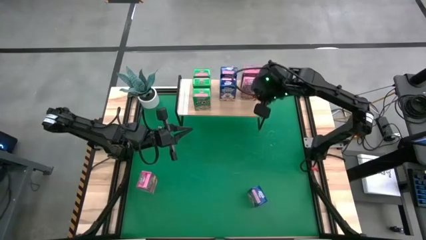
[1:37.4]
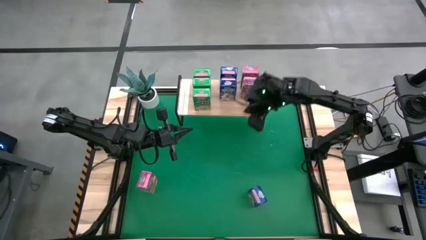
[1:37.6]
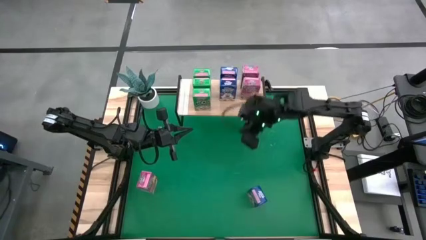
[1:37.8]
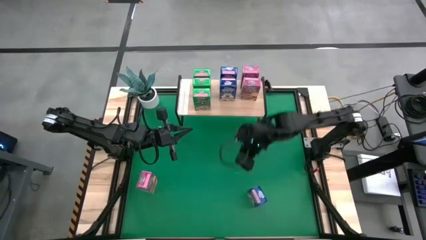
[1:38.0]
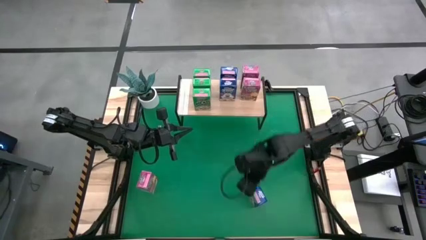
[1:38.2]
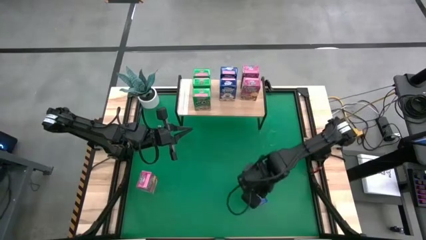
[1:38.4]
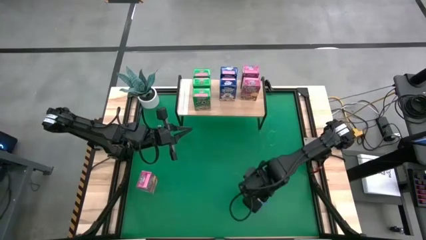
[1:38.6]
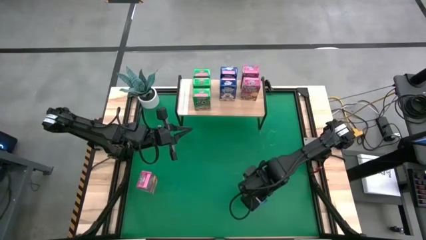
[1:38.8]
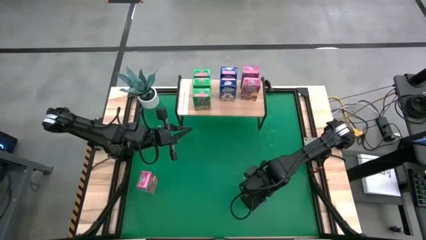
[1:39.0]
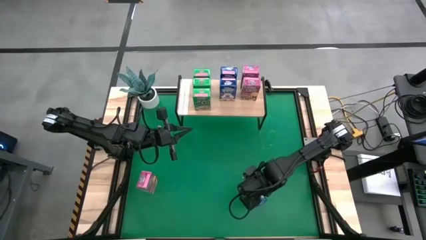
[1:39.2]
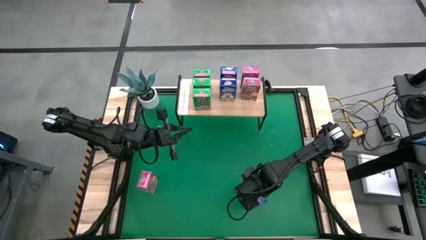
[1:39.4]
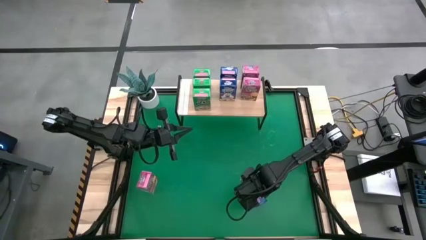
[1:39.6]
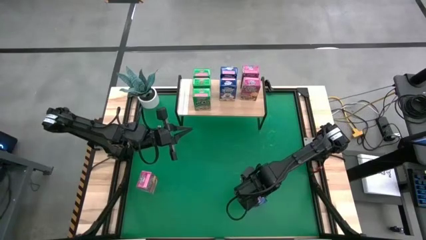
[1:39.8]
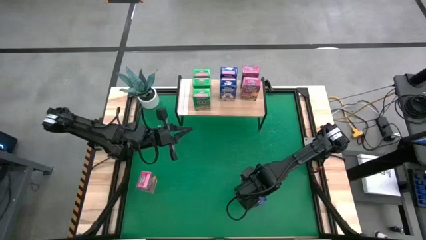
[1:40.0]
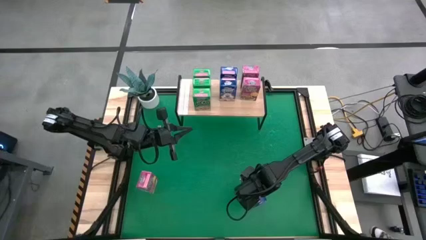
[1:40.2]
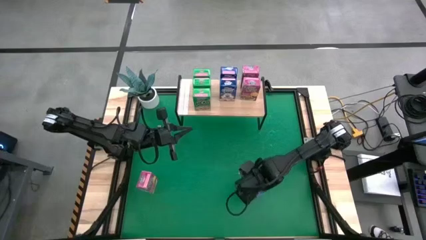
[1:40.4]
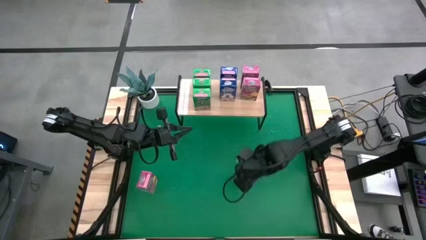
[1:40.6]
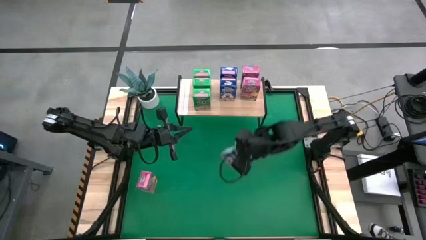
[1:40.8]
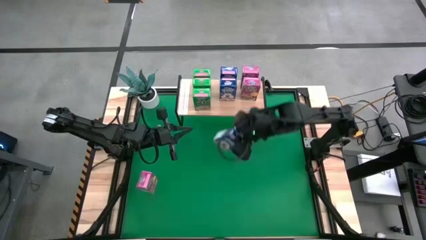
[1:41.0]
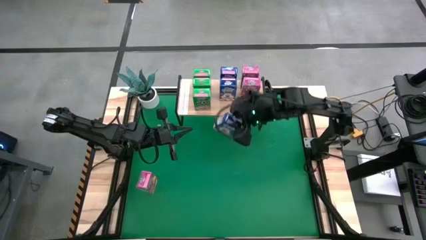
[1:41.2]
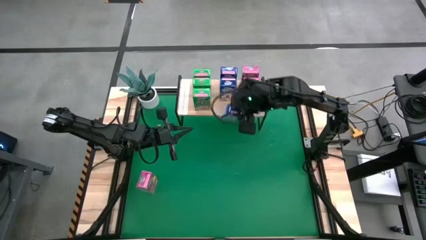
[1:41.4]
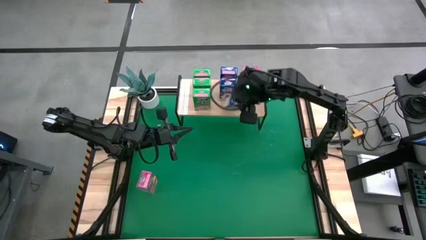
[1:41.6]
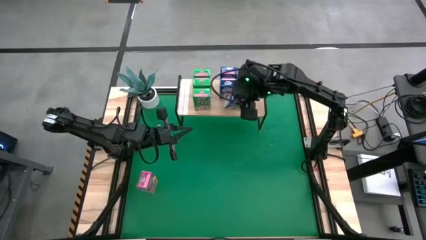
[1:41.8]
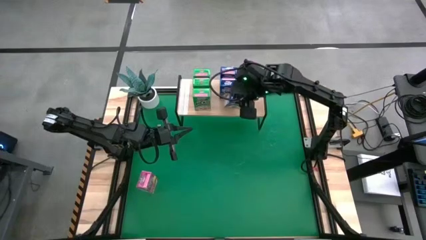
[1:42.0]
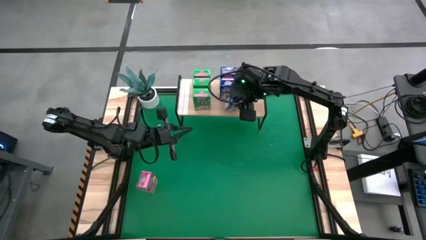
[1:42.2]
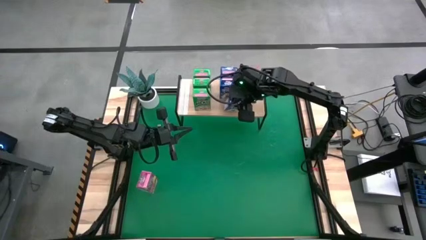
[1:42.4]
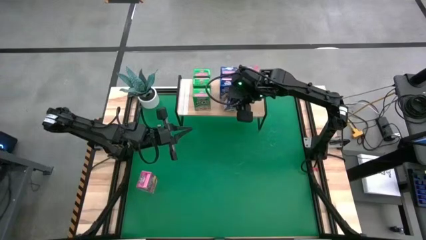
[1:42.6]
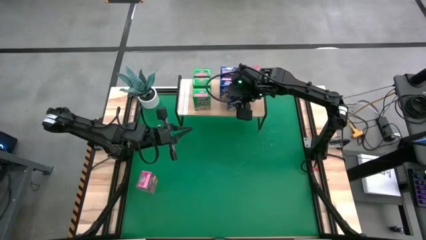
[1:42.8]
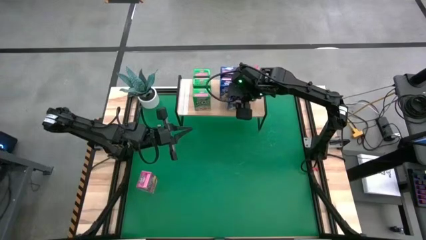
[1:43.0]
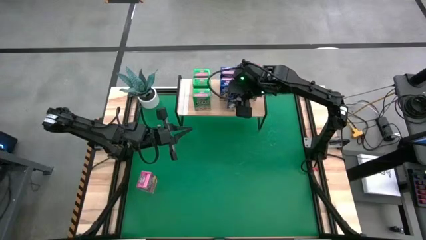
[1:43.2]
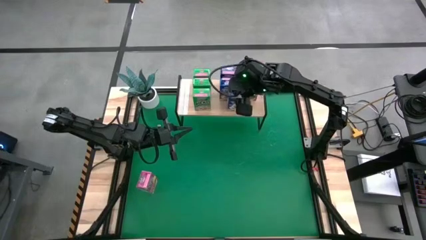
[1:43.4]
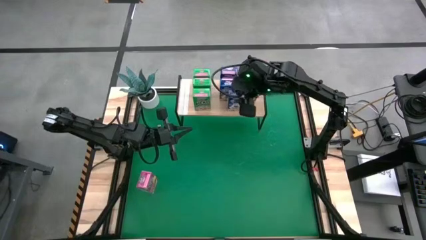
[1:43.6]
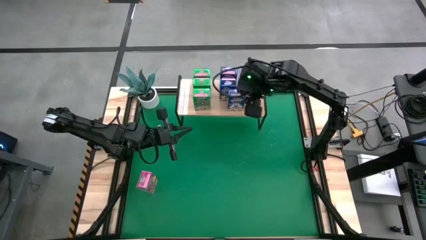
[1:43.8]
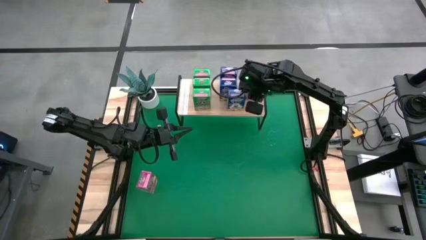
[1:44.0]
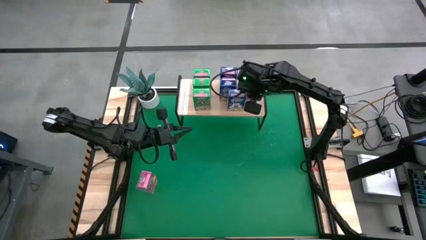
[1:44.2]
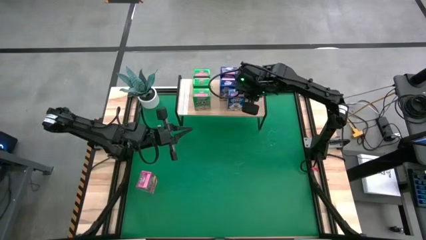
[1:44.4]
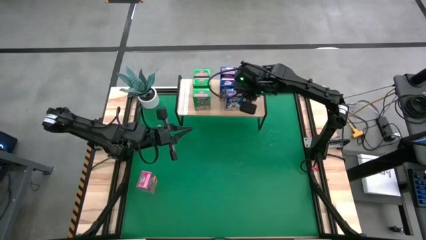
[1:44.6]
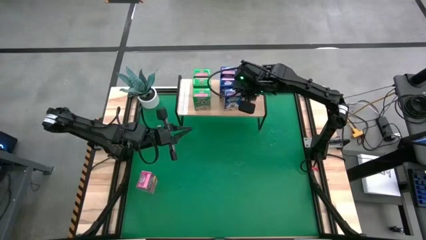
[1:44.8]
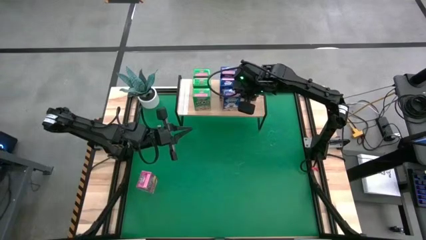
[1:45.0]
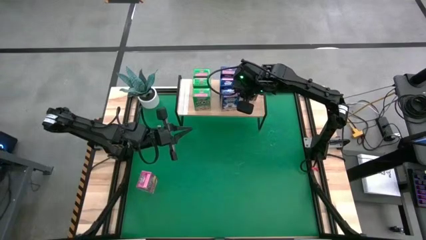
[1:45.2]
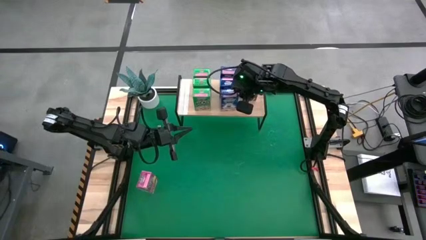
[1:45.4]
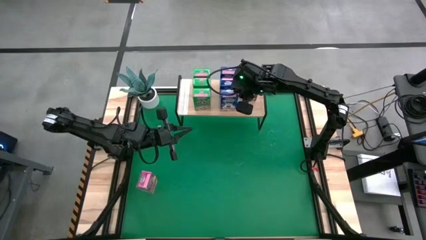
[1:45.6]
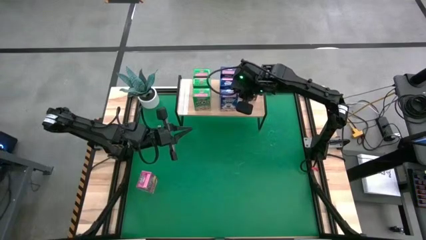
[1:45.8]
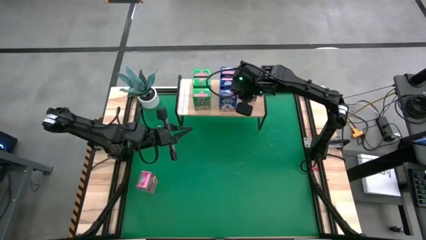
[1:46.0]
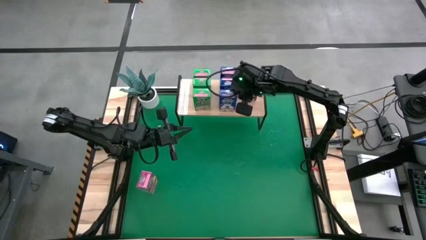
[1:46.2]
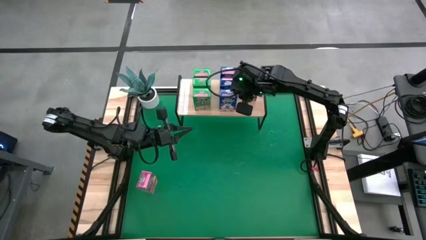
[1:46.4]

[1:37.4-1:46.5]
Task: Stack cereal on shelf
Put the blue cereal box on the shelf aligned with the other blue cereal boxes

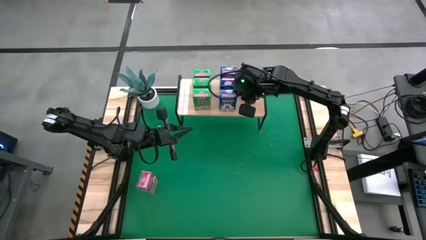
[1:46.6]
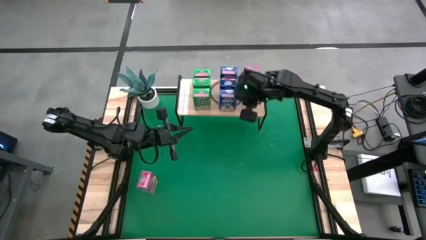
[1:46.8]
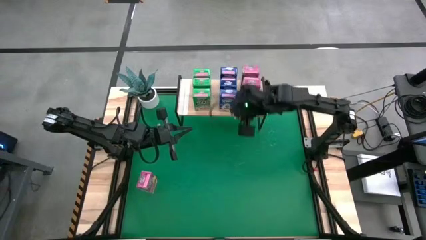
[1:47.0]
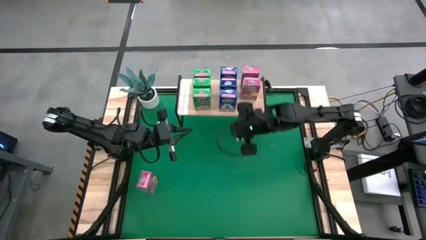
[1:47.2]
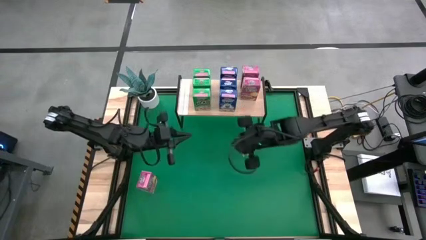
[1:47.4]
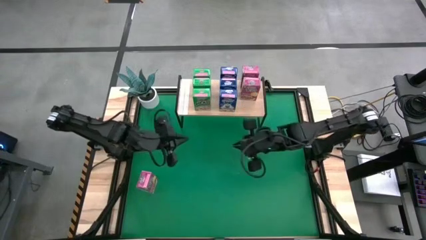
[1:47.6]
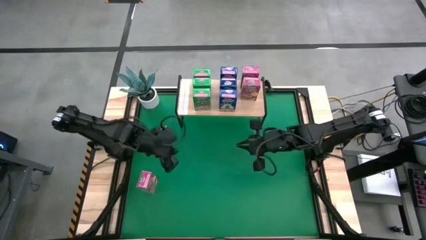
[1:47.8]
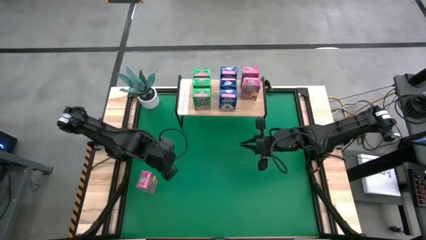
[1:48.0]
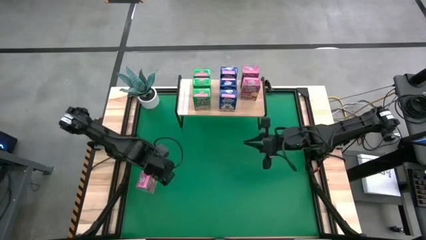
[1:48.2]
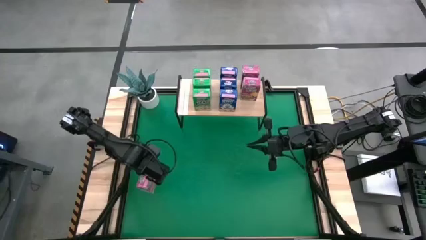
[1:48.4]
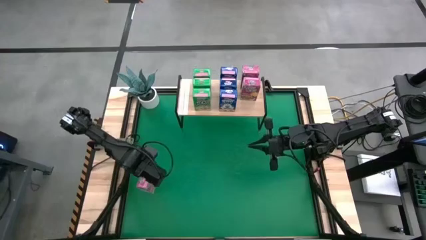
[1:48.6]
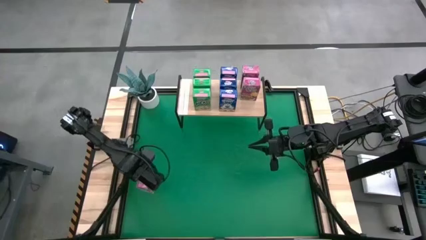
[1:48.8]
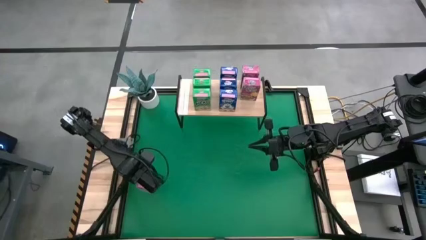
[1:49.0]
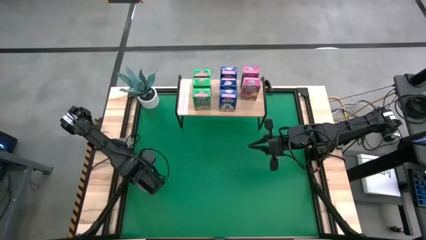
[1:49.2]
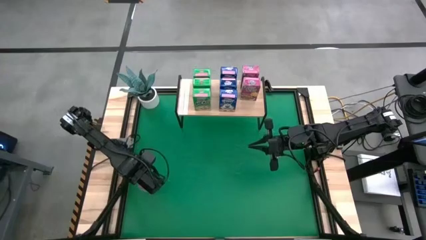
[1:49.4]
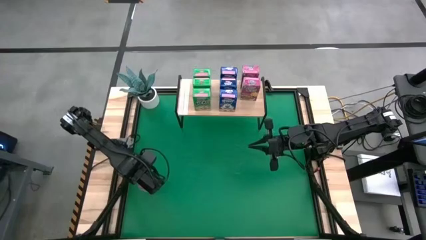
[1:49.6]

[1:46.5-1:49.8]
Put the pink cereal box on the shelf aligned with the other pink cereal boxes

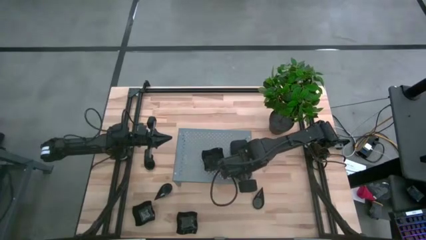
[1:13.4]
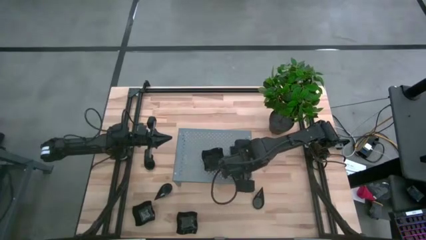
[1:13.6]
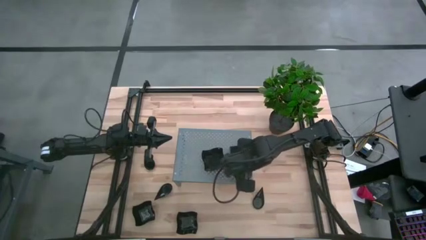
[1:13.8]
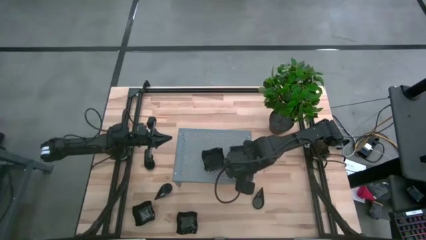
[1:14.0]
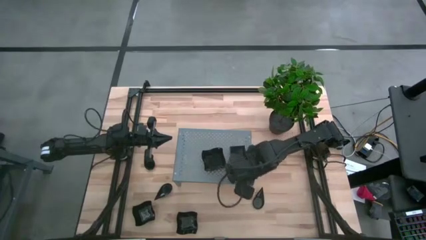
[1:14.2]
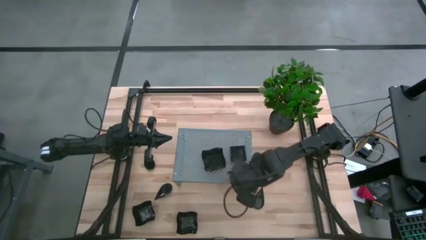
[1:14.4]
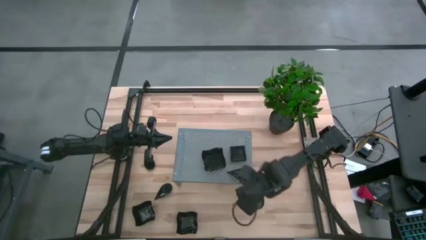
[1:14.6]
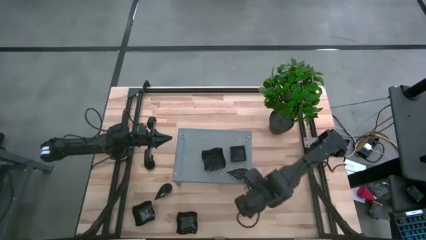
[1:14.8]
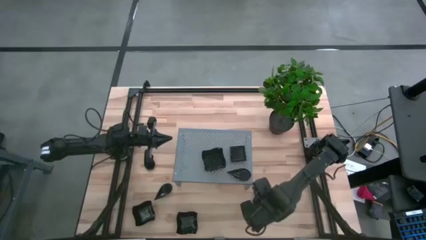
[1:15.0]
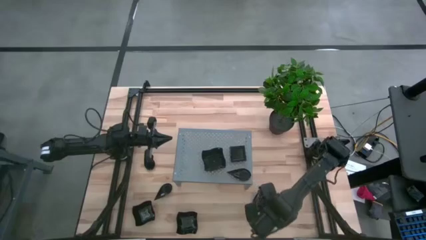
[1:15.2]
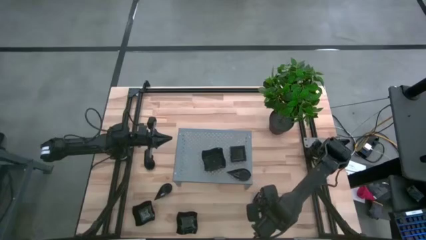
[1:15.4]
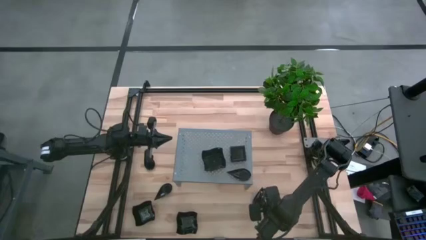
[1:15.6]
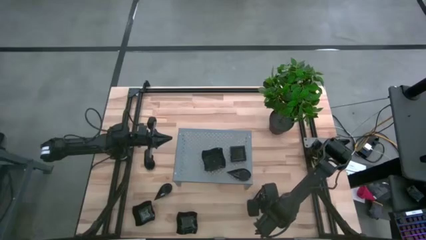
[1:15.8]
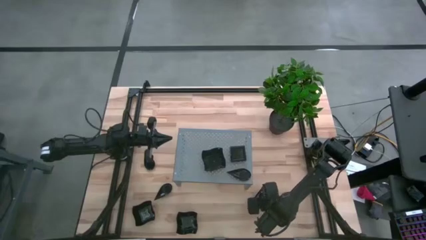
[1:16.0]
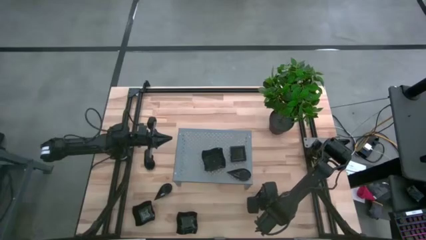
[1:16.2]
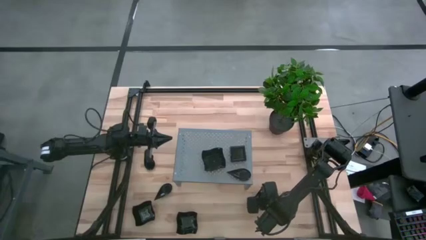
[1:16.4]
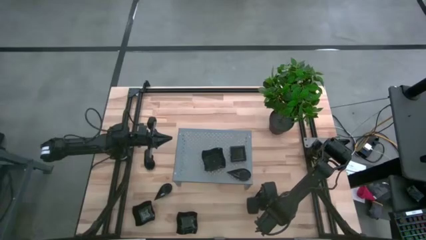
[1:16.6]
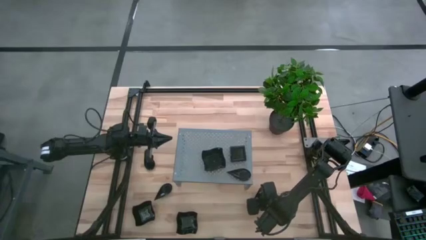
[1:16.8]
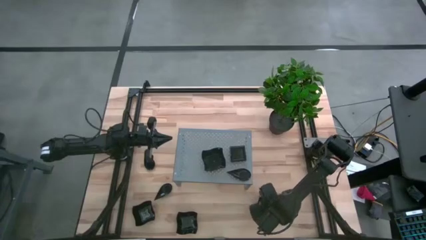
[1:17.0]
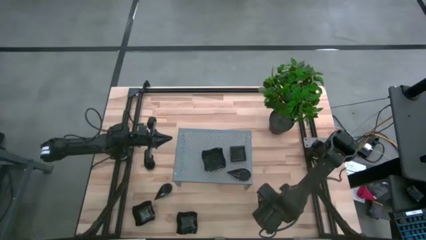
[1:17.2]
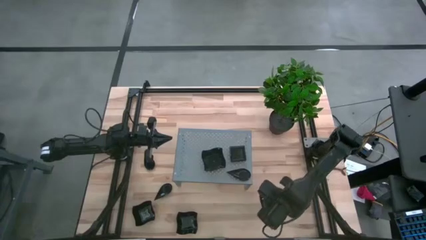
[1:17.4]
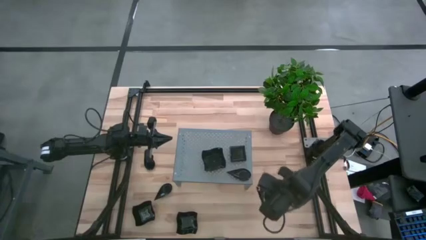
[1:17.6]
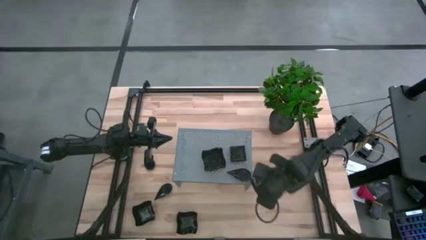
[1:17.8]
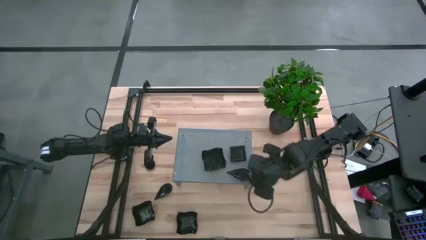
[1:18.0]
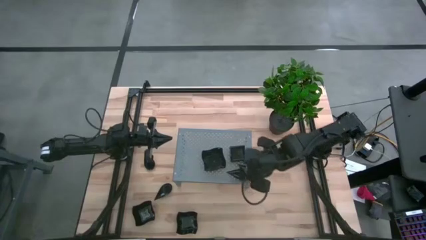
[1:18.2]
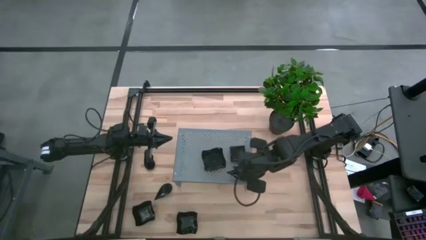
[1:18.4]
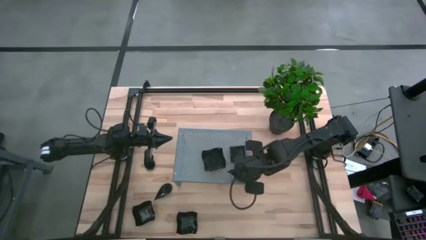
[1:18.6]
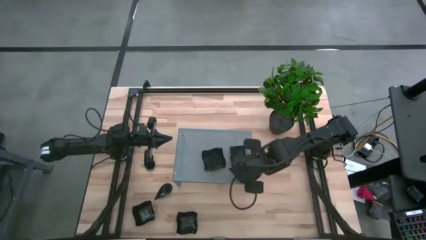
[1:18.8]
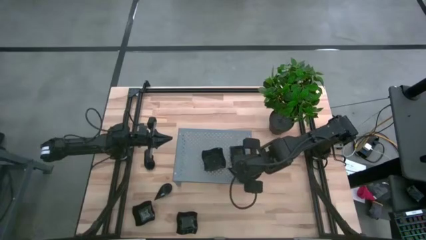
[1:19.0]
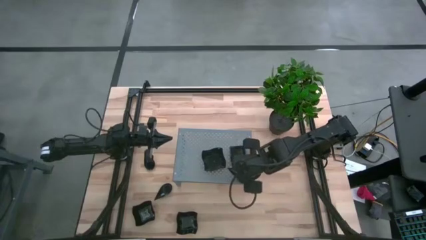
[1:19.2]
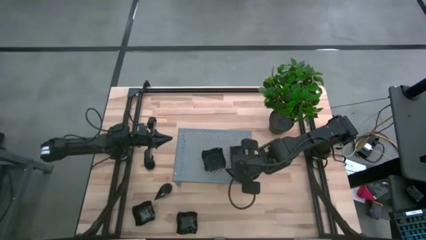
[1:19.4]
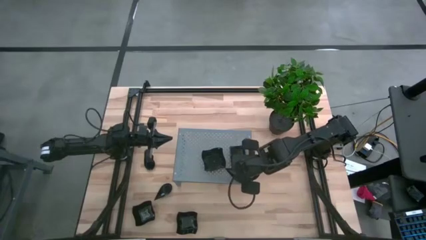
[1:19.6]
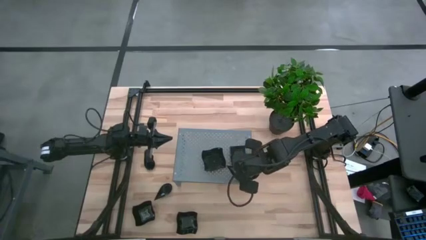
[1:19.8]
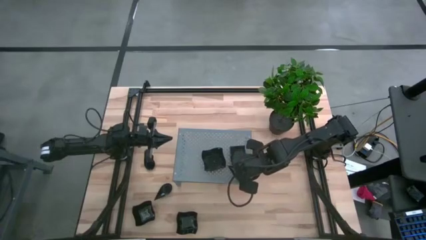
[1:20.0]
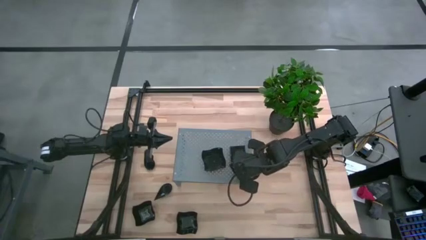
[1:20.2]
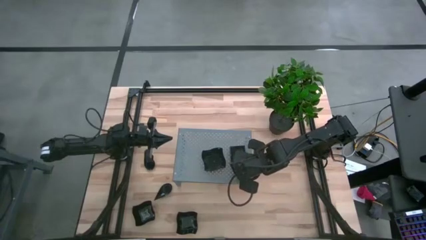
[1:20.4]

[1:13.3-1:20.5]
Task: Pick & Place Mini shaped plates
Stack the top right drop-shaped plate on the drop-shaped plate on the shelf
